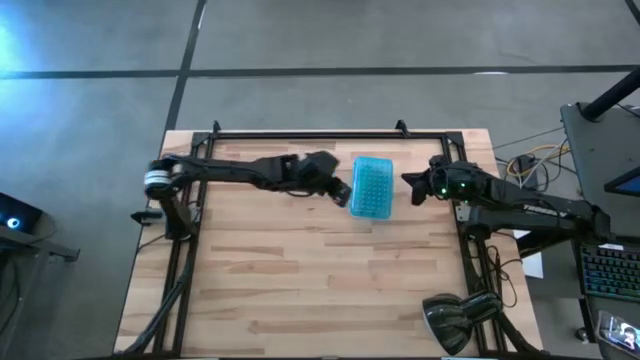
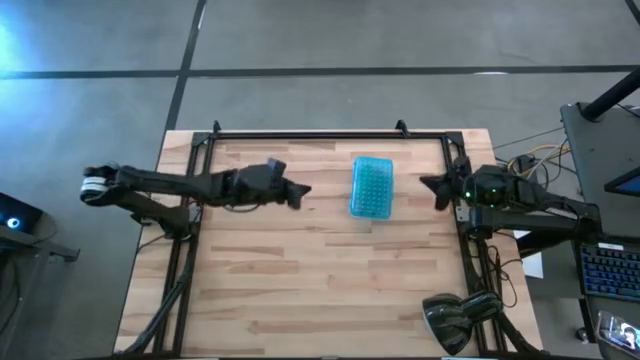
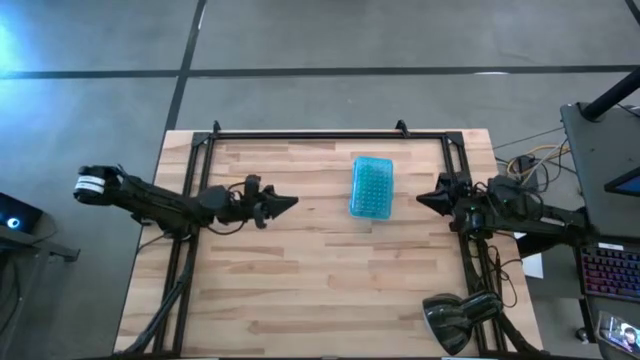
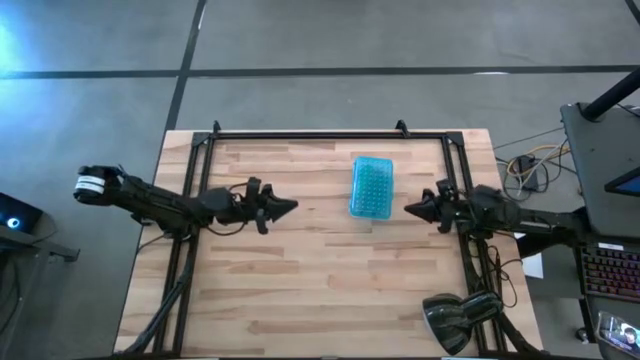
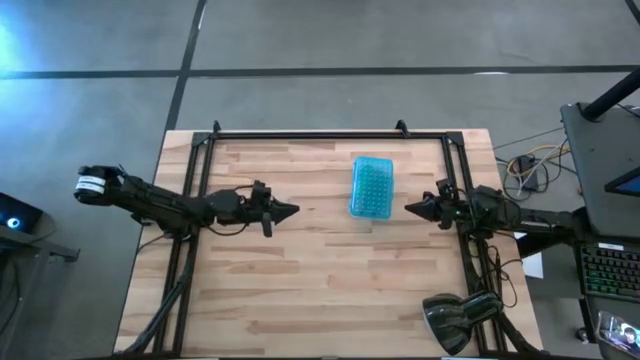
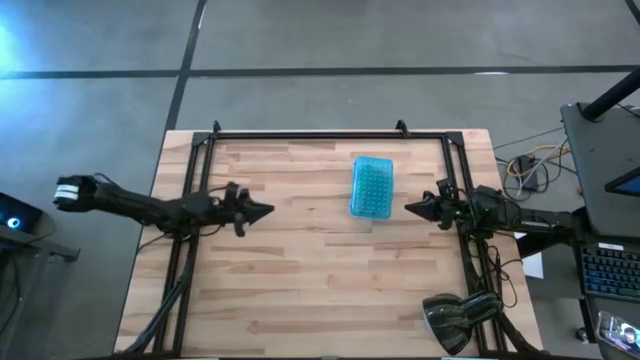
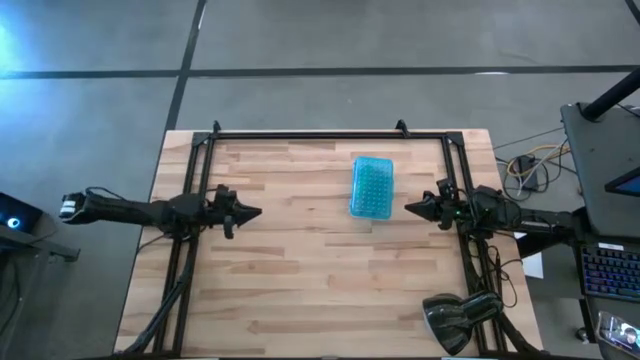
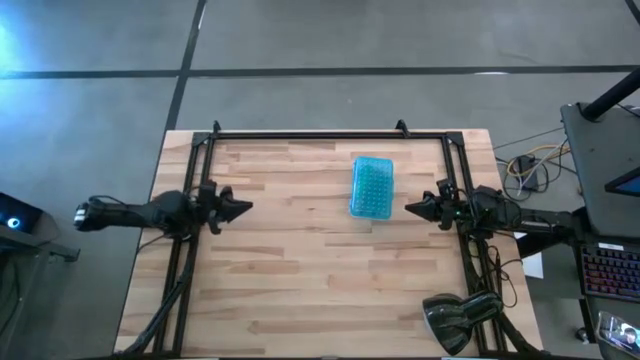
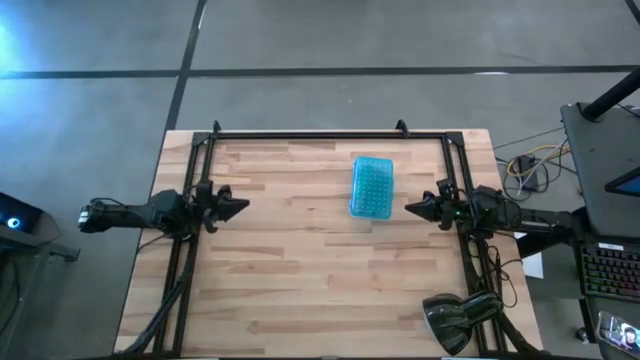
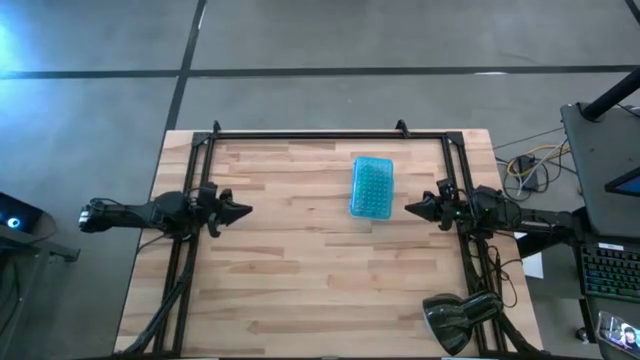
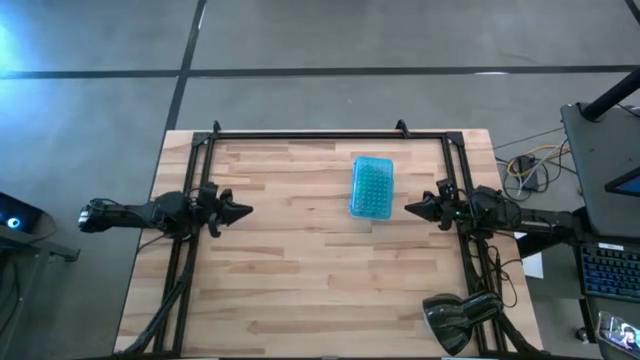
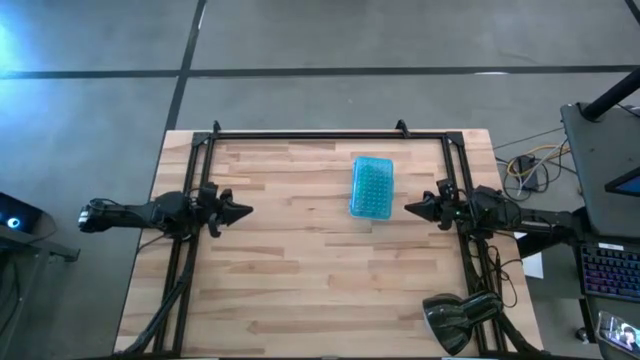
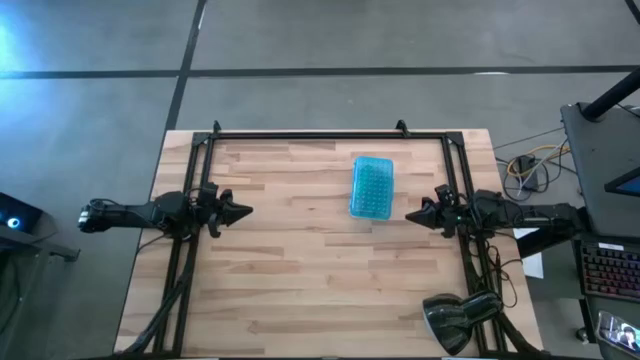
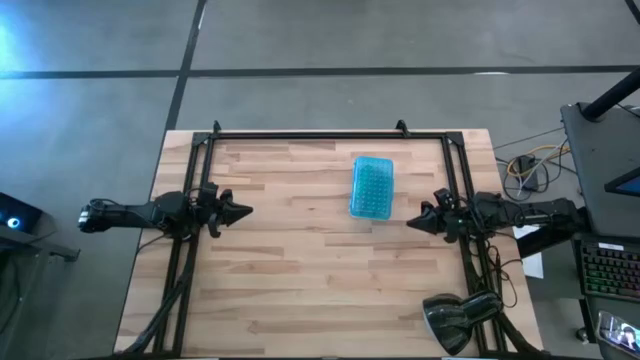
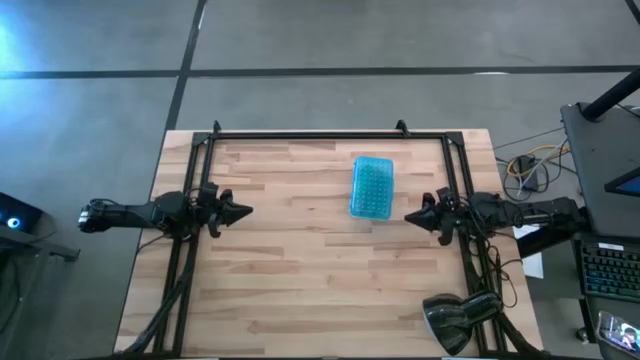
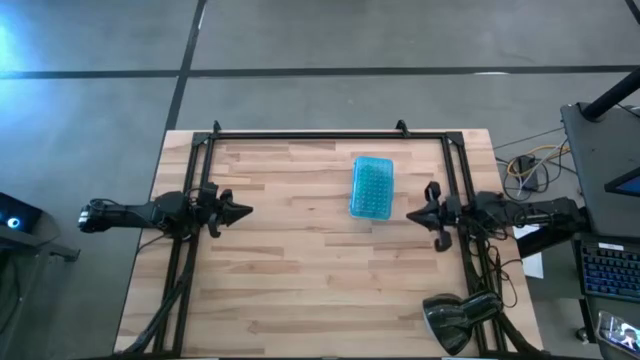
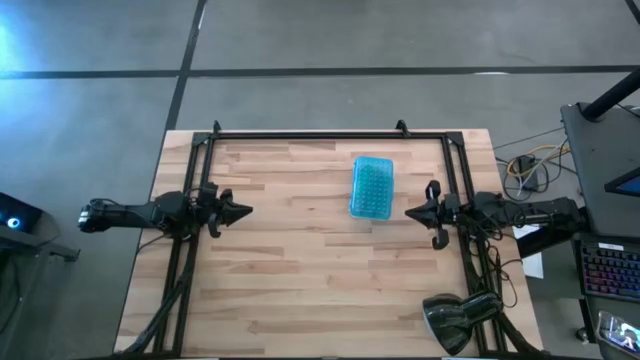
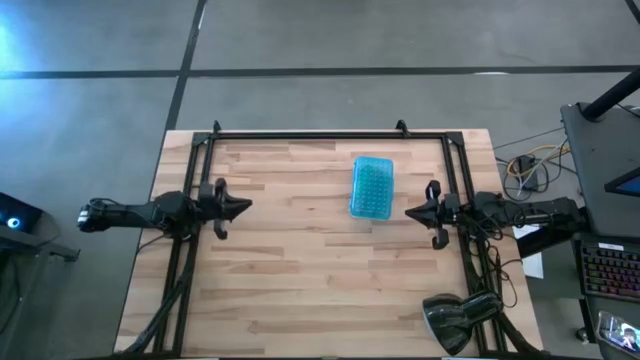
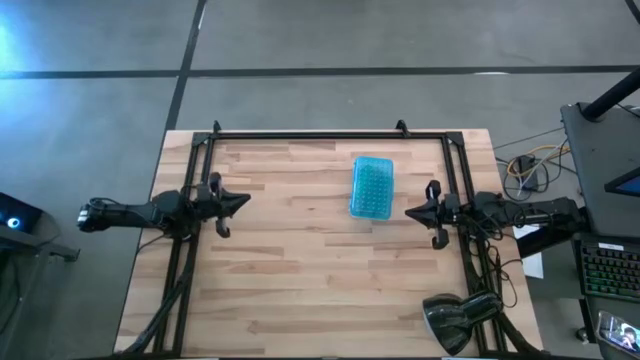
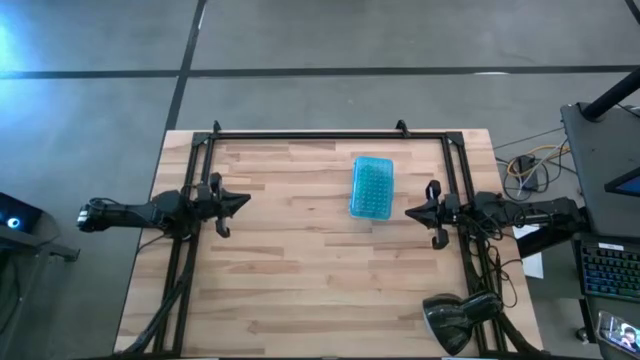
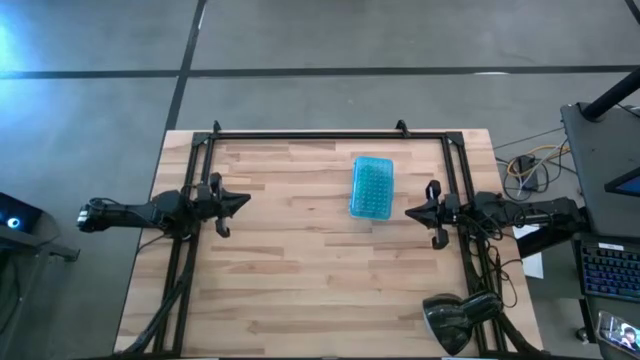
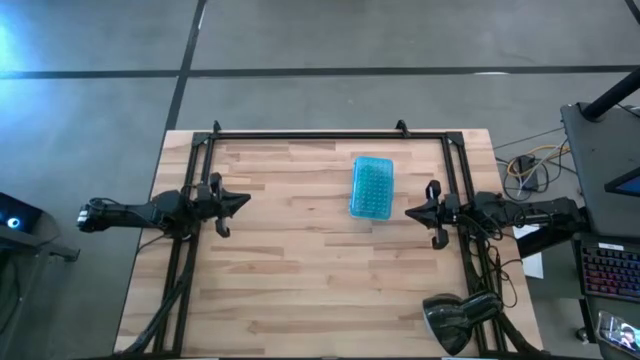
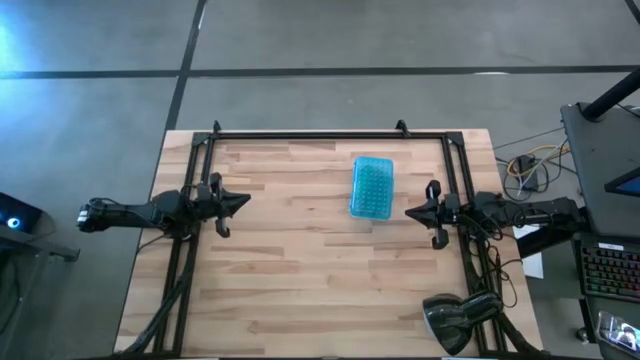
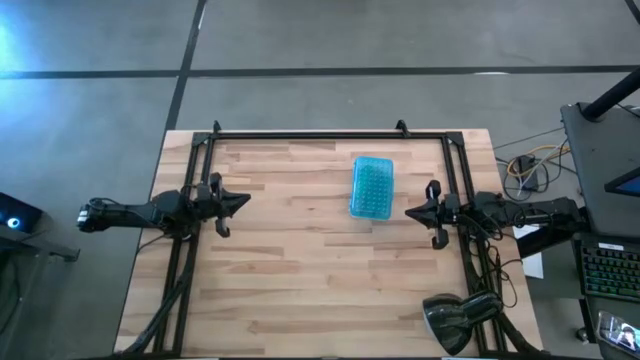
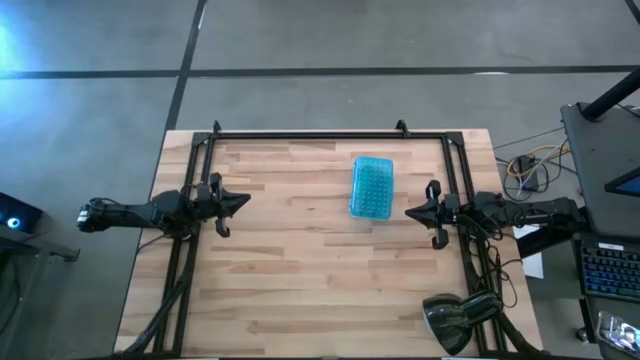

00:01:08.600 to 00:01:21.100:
Task: Pick & place school supplies into a supply box
Return to Home Position

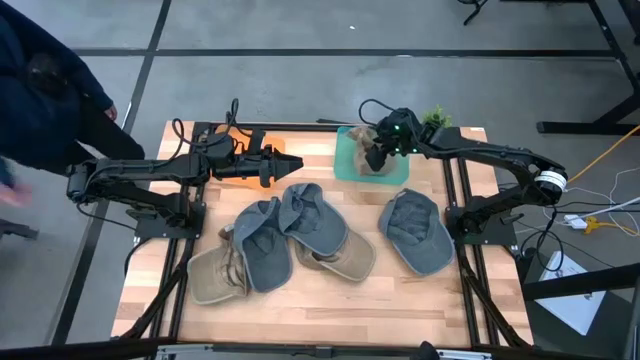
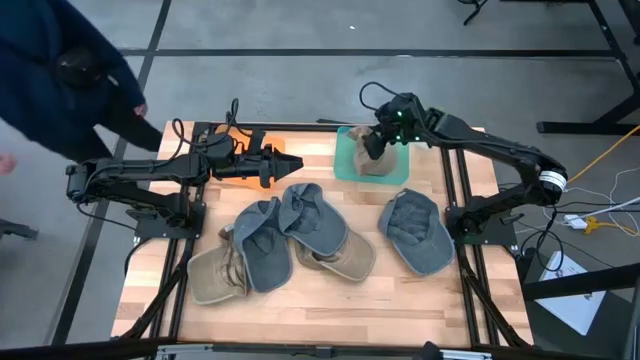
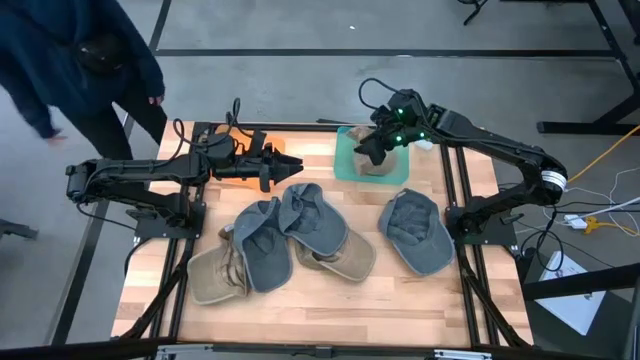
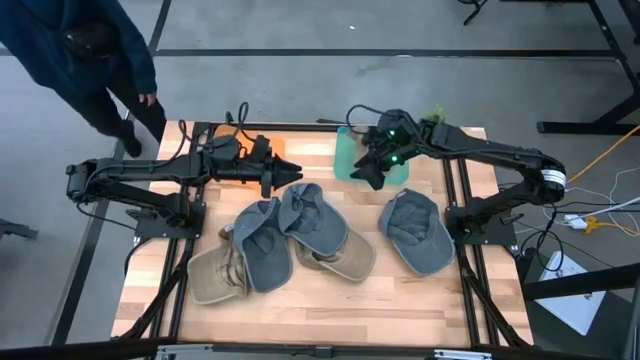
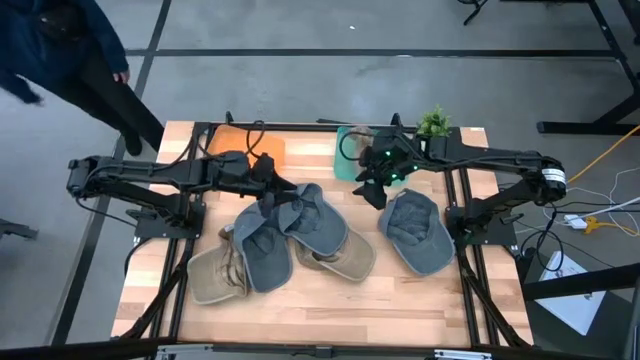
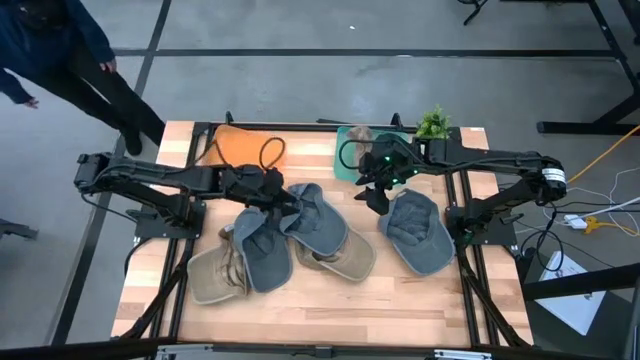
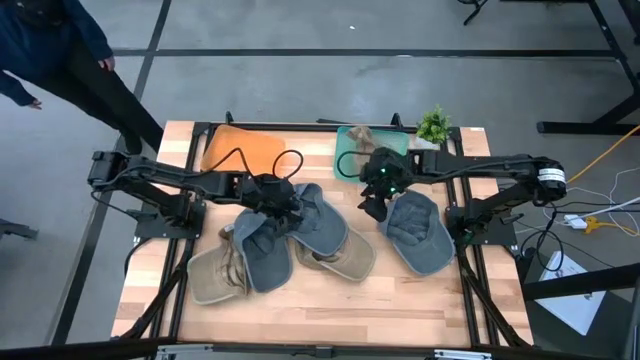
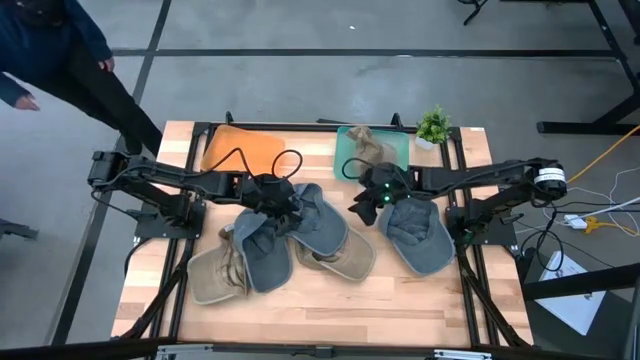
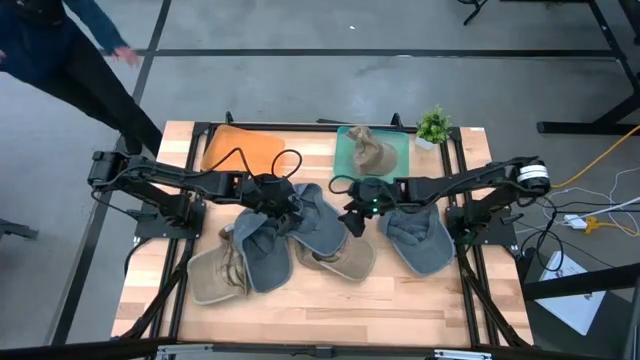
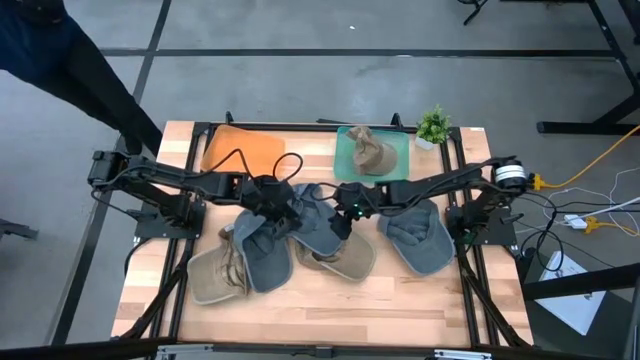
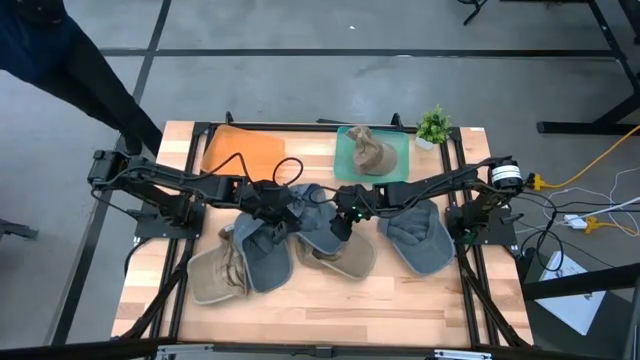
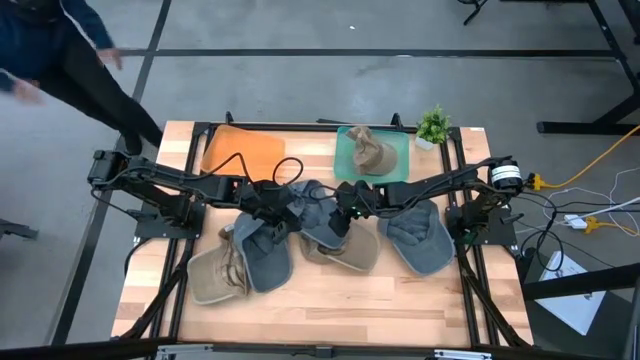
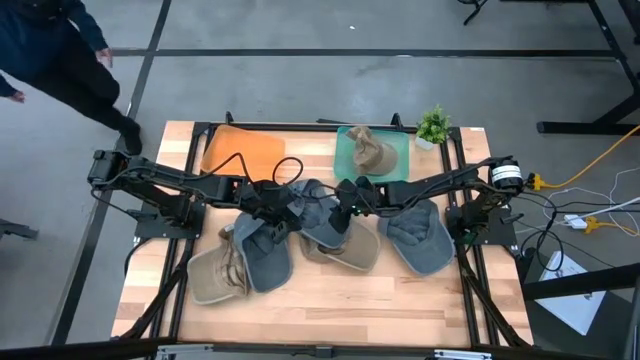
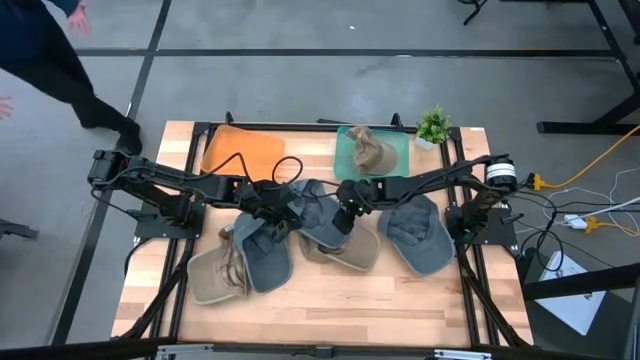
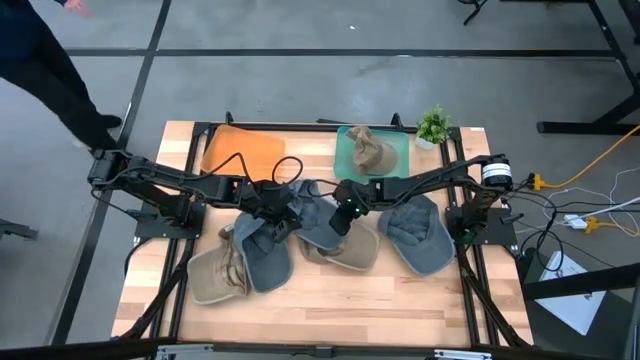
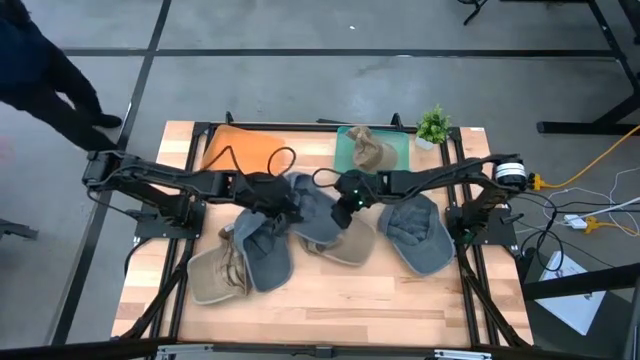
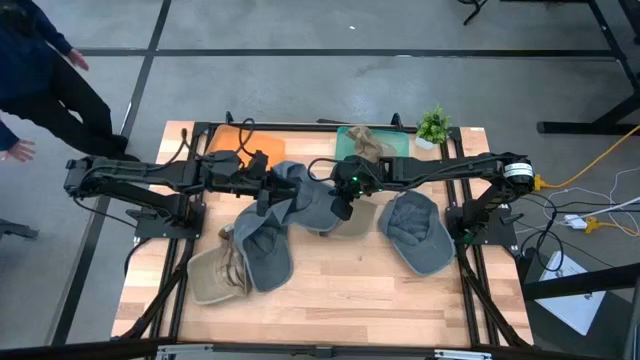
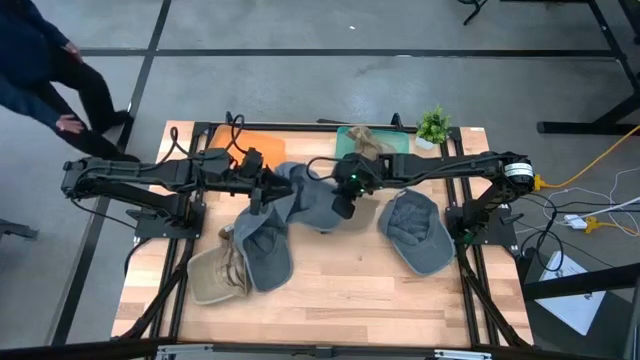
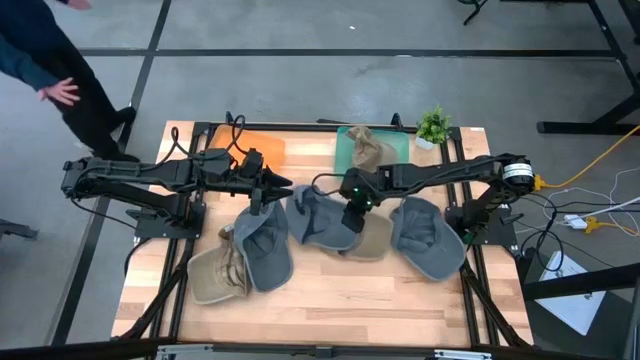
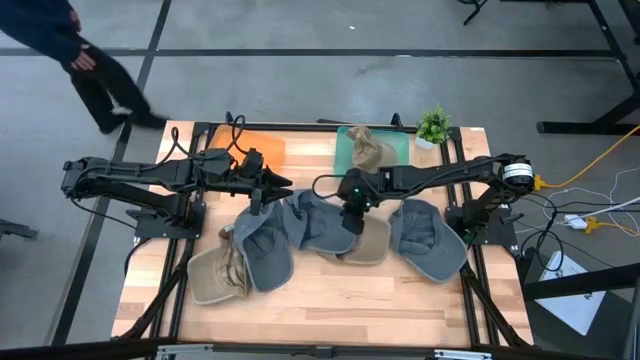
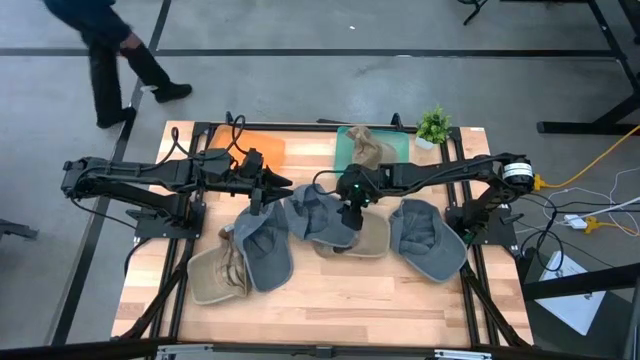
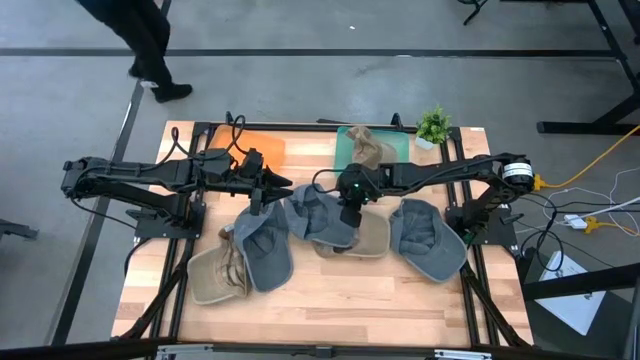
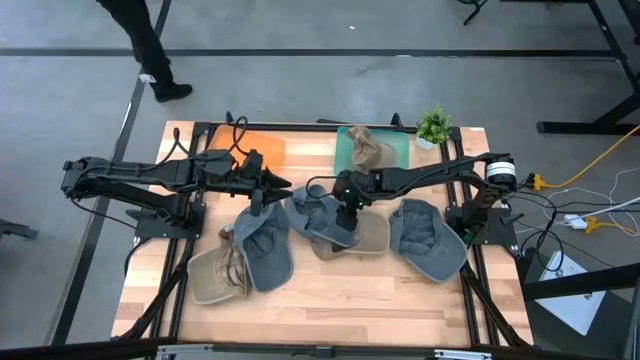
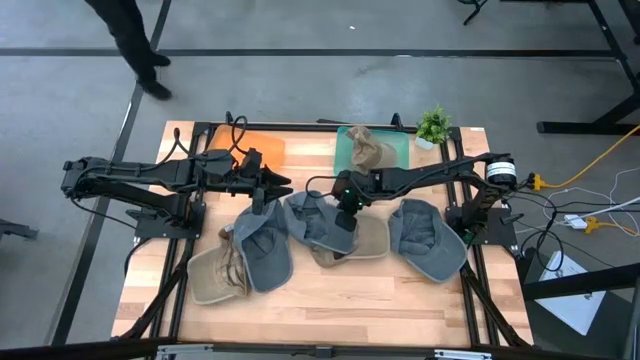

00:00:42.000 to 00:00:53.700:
Task: Pick & Place hat
Put the middle gray cap into the orange bin
